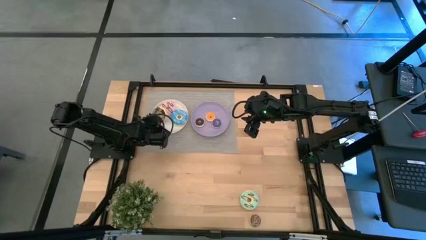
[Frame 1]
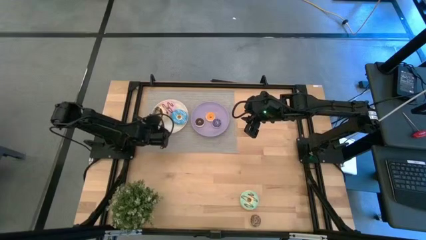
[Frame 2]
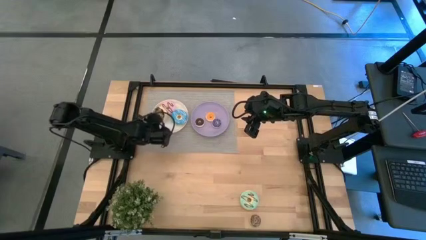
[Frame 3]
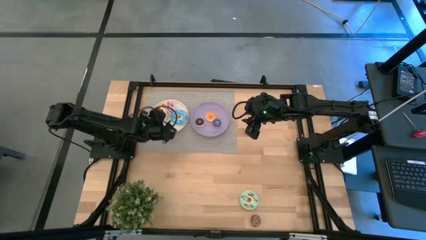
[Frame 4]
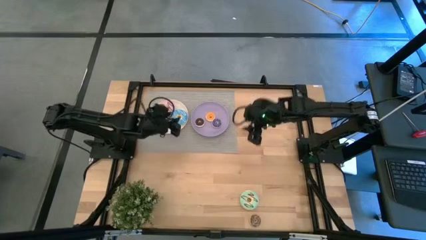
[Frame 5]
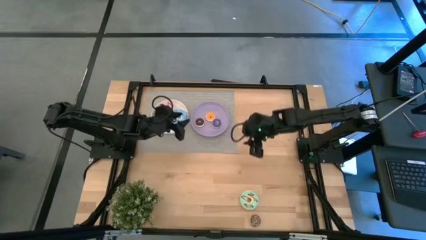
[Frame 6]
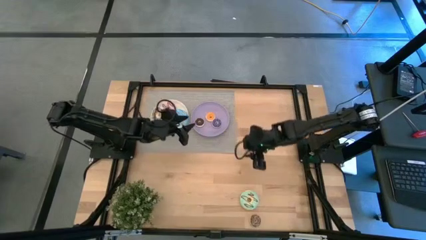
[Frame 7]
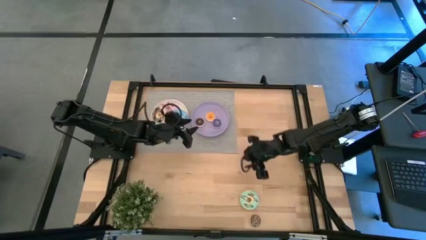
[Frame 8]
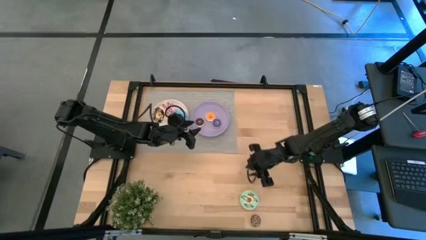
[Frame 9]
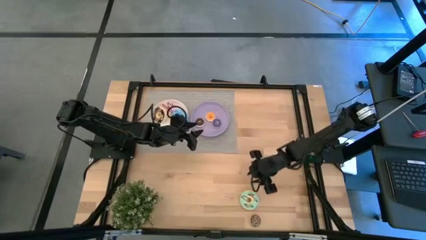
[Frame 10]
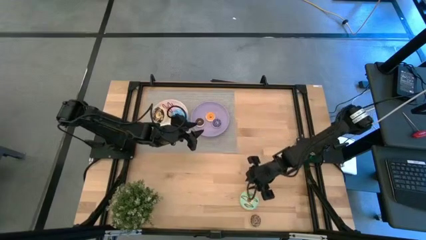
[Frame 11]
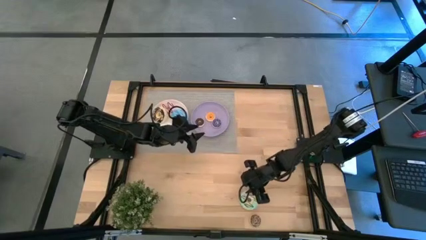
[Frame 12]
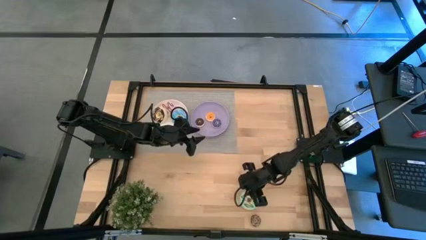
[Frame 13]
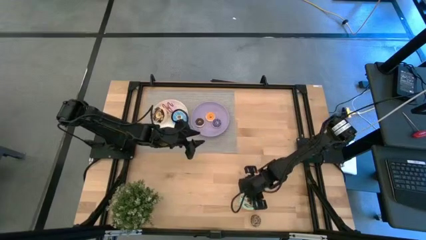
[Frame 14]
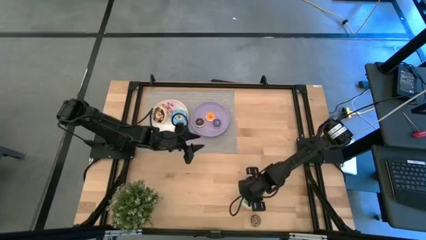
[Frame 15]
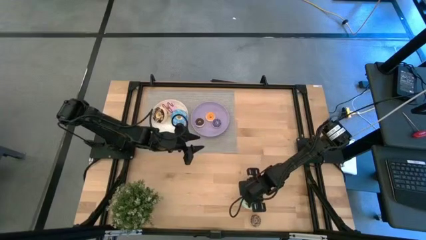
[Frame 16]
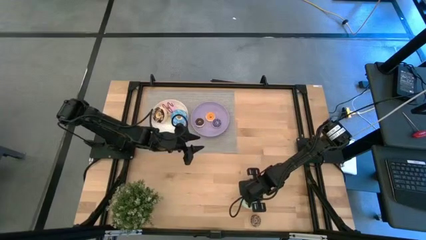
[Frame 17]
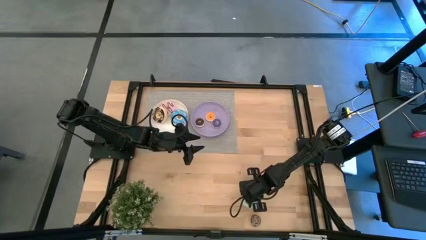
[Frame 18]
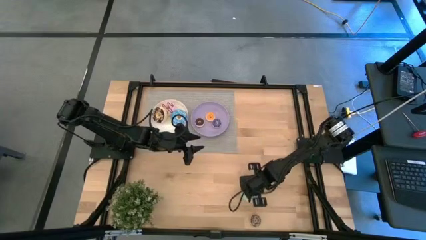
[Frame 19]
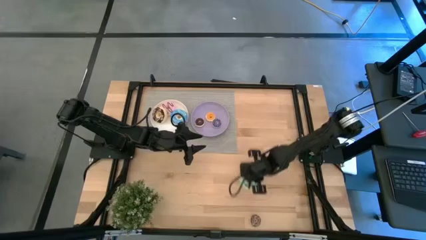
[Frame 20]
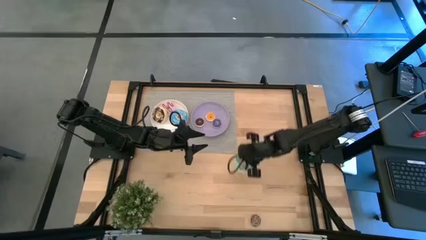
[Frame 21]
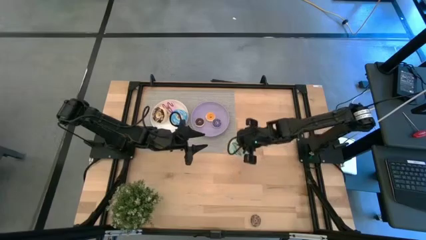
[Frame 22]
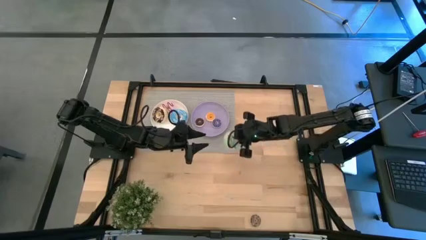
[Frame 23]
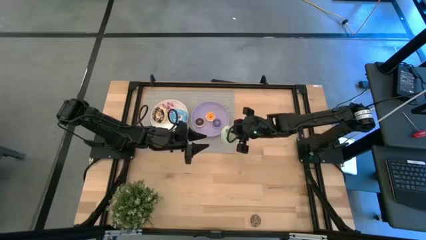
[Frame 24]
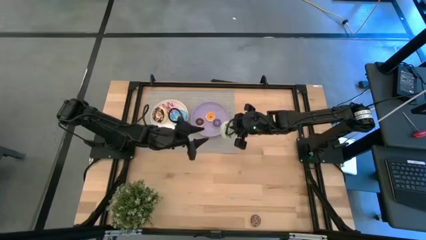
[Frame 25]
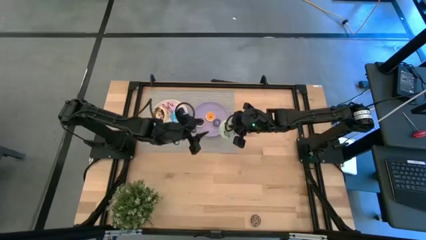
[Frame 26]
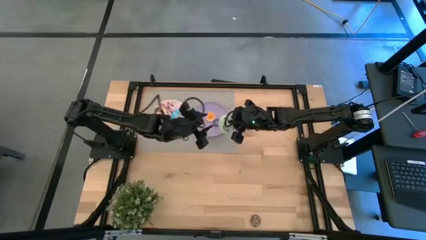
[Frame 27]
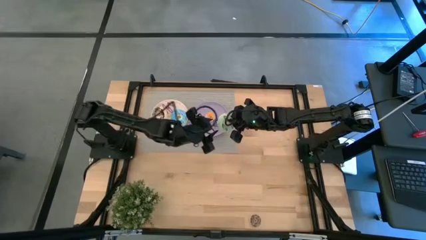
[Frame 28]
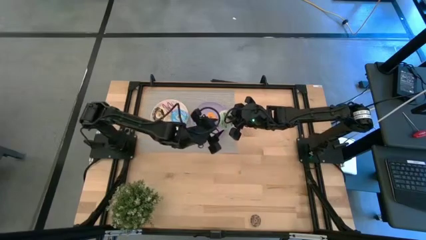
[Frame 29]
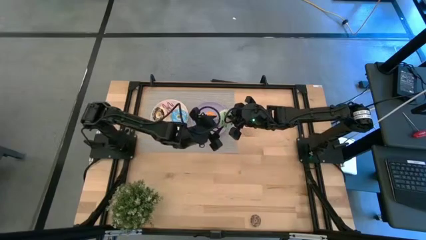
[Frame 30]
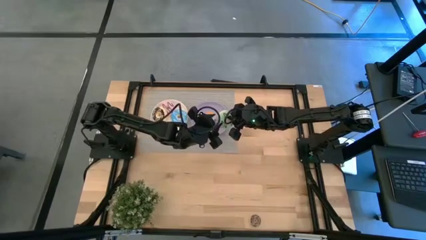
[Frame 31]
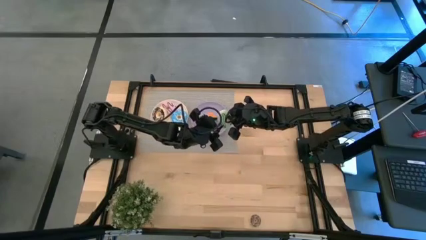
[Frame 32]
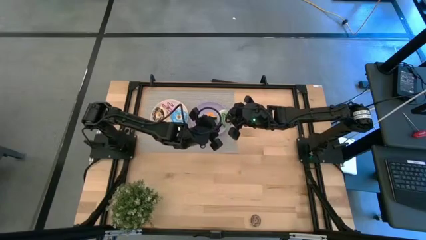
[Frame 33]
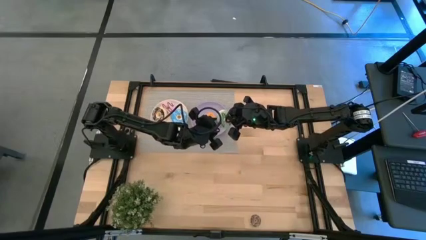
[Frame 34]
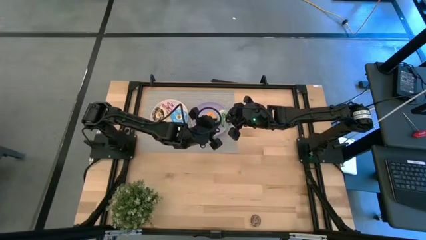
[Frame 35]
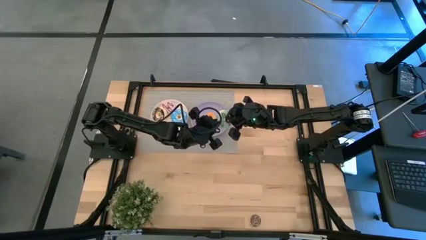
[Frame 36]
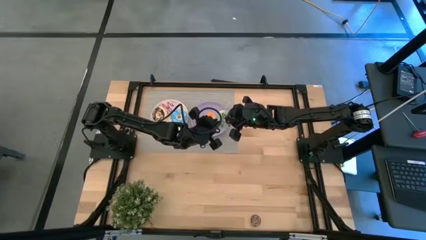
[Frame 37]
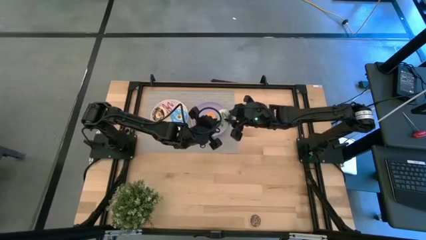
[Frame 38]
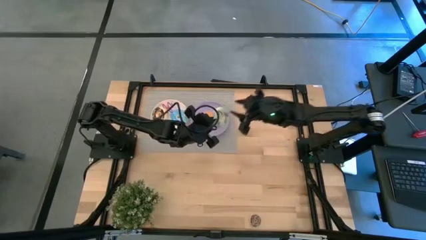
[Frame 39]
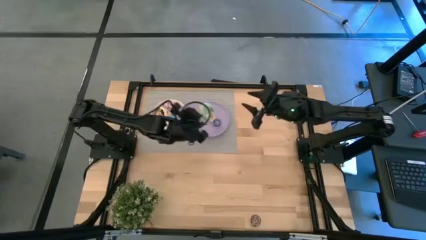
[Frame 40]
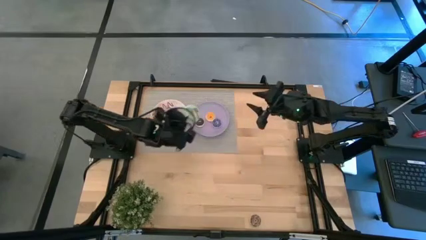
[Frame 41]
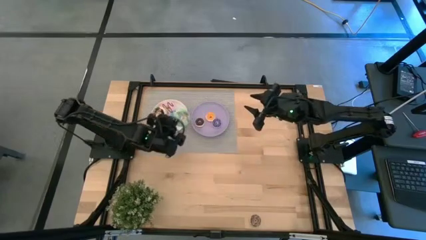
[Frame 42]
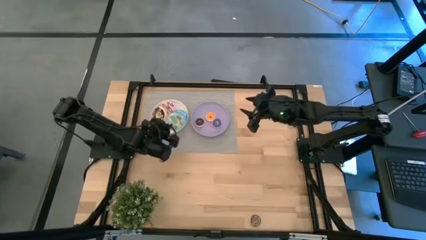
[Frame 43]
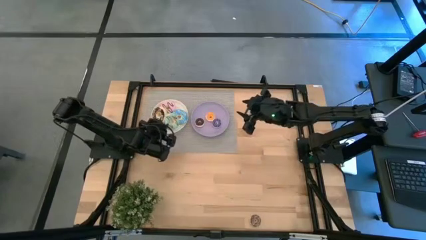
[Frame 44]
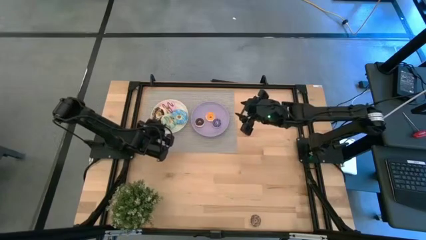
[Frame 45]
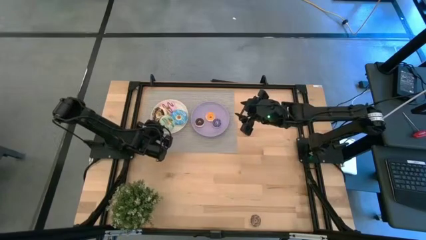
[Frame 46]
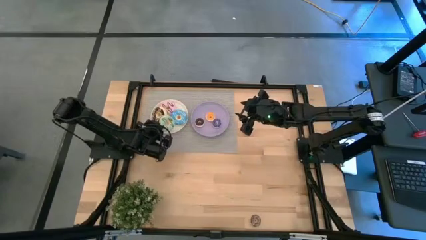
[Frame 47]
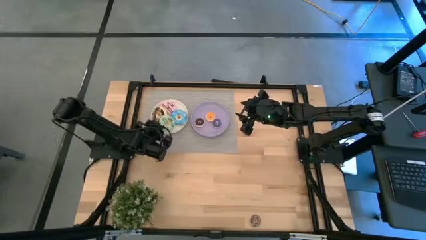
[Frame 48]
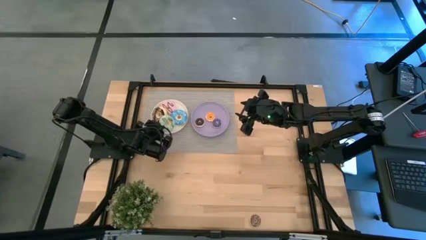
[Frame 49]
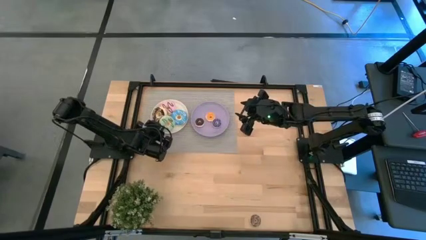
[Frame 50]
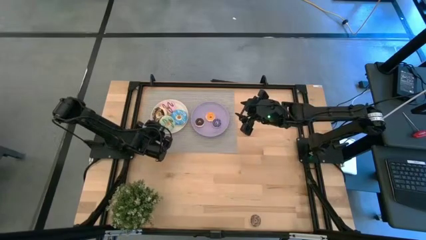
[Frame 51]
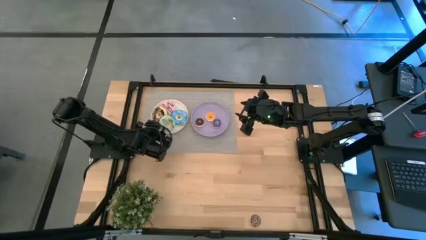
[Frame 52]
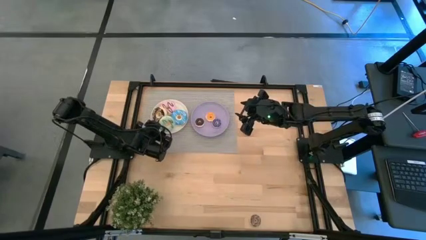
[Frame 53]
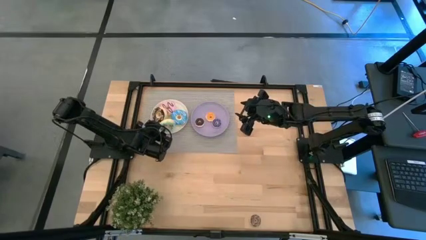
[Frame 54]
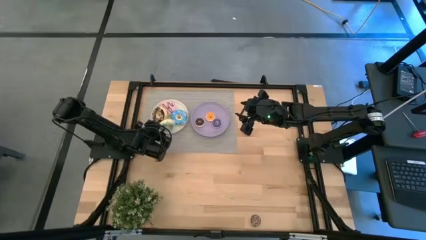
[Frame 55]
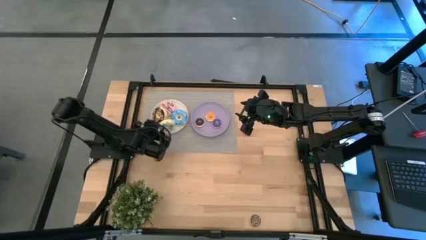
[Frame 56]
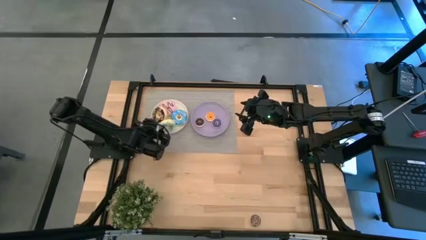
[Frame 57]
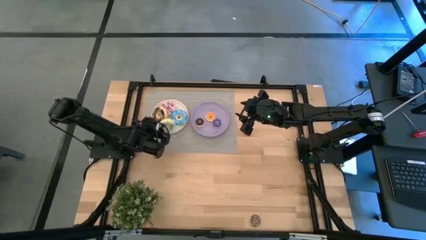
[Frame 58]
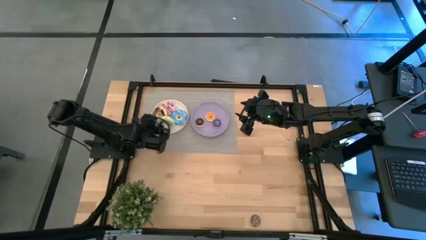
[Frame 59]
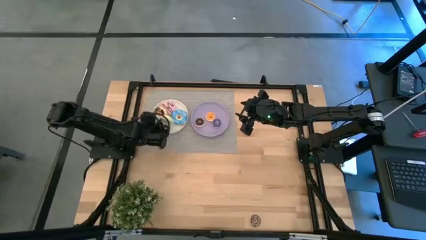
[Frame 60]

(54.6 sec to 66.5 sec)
Task: Pick & Place donuts
Put the large green donut on the white plate
